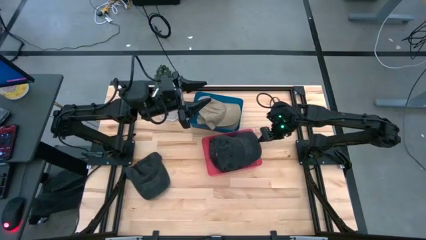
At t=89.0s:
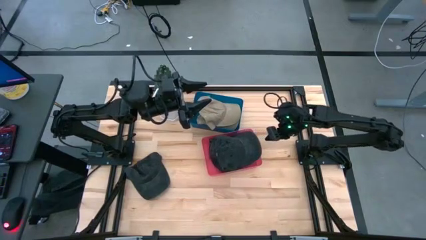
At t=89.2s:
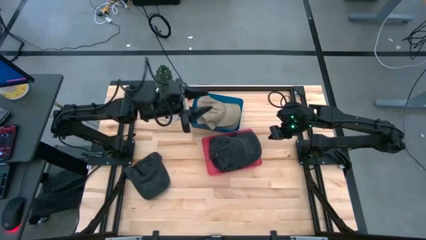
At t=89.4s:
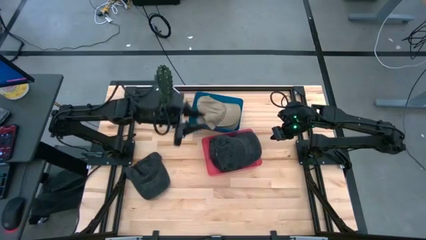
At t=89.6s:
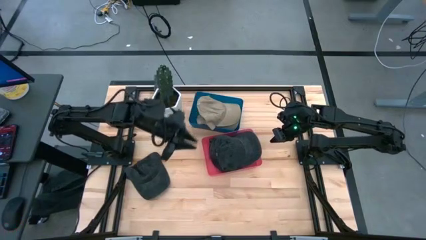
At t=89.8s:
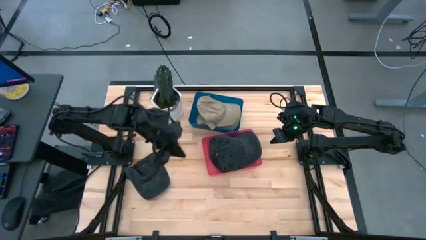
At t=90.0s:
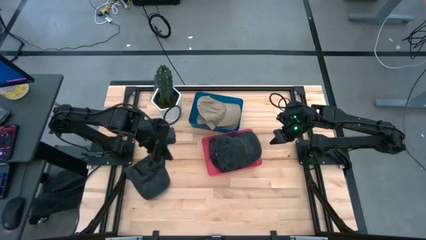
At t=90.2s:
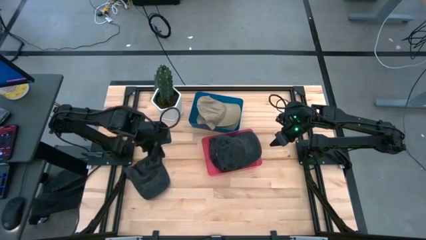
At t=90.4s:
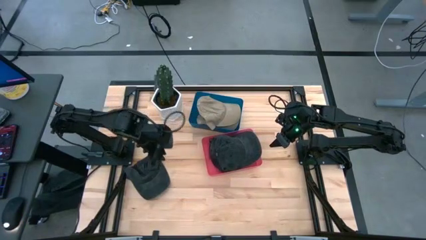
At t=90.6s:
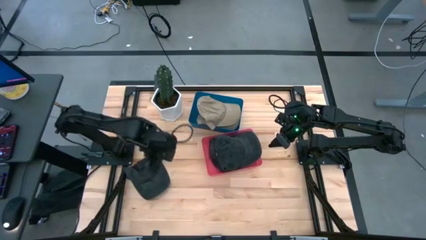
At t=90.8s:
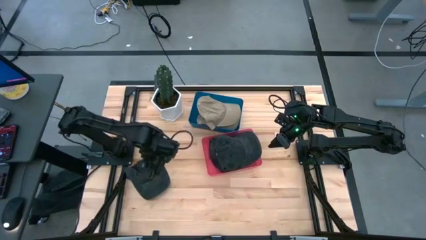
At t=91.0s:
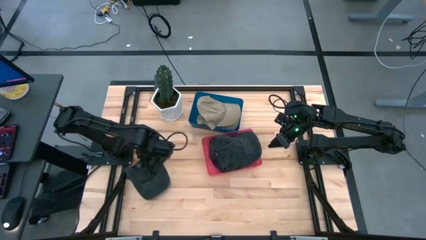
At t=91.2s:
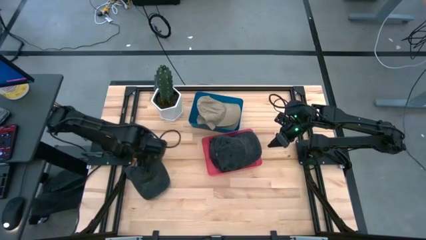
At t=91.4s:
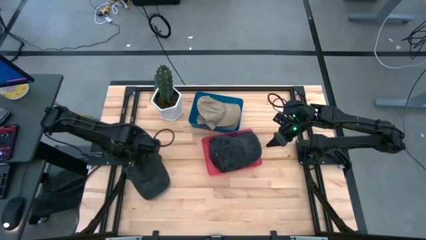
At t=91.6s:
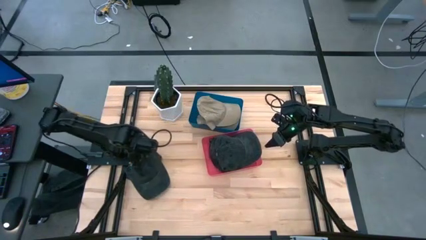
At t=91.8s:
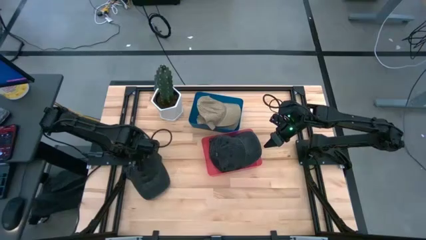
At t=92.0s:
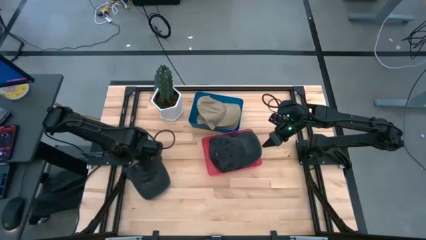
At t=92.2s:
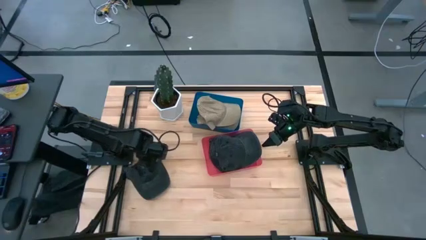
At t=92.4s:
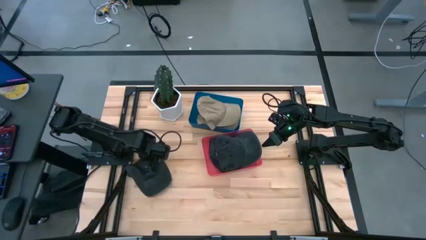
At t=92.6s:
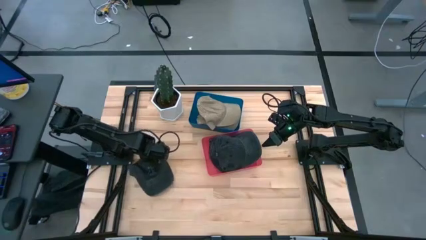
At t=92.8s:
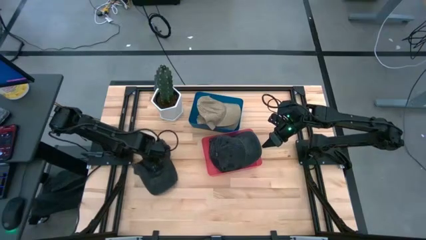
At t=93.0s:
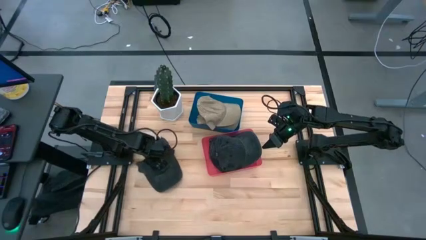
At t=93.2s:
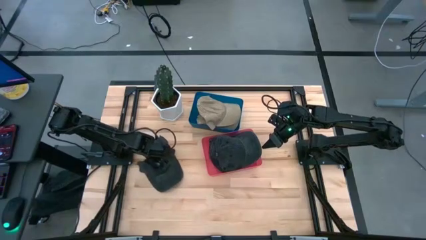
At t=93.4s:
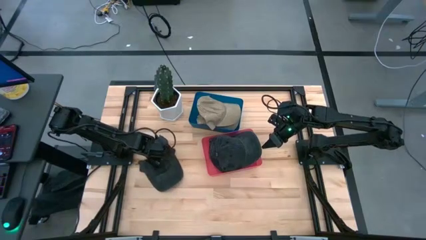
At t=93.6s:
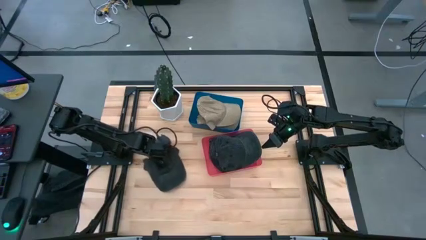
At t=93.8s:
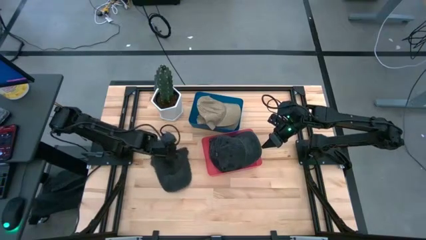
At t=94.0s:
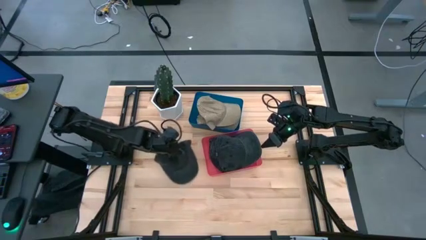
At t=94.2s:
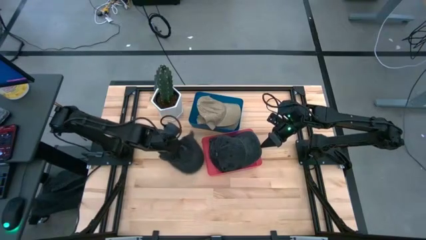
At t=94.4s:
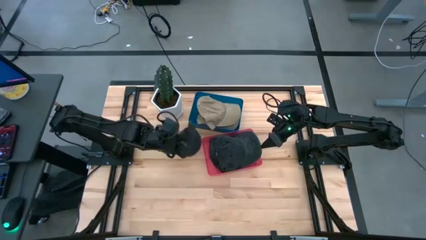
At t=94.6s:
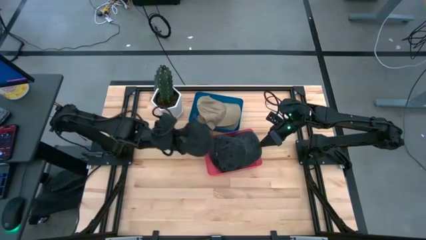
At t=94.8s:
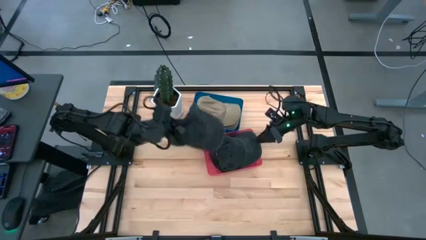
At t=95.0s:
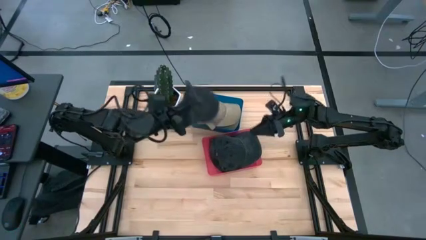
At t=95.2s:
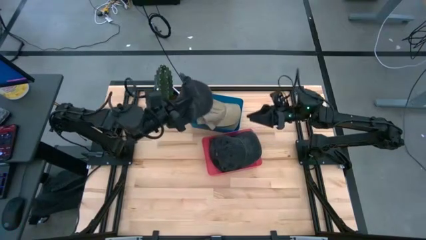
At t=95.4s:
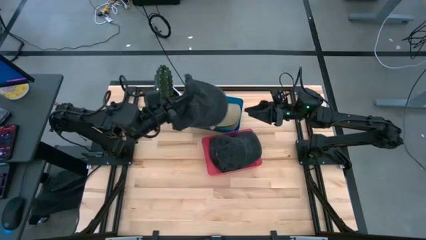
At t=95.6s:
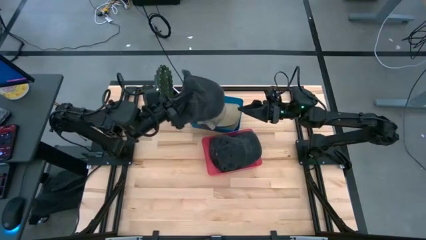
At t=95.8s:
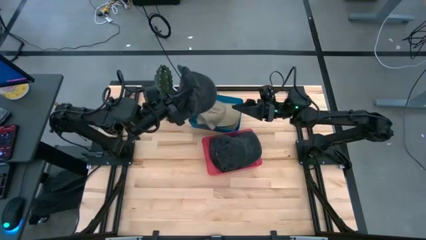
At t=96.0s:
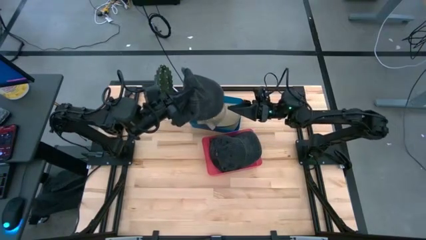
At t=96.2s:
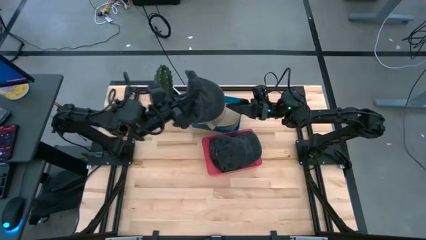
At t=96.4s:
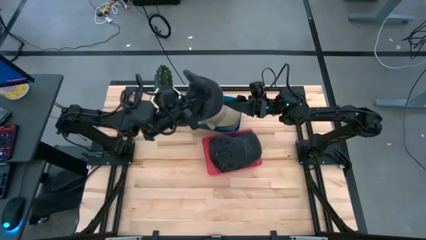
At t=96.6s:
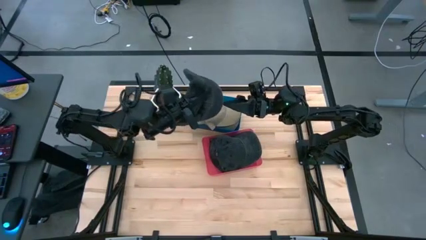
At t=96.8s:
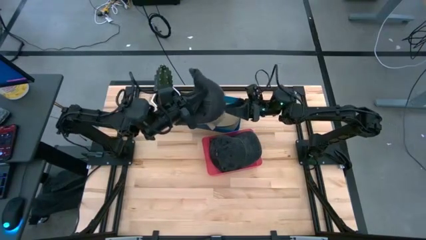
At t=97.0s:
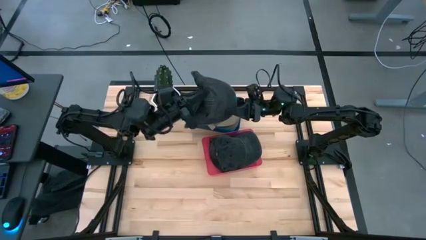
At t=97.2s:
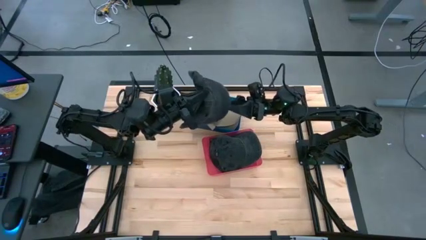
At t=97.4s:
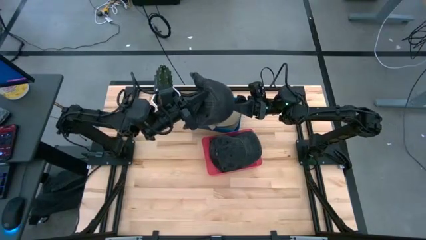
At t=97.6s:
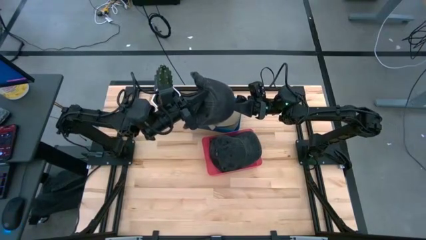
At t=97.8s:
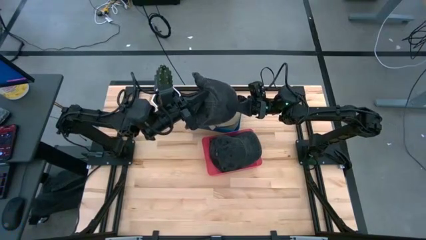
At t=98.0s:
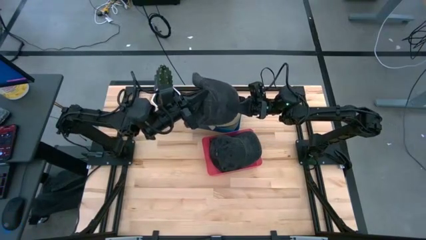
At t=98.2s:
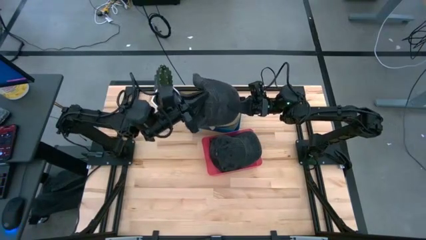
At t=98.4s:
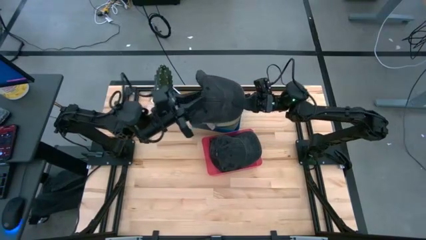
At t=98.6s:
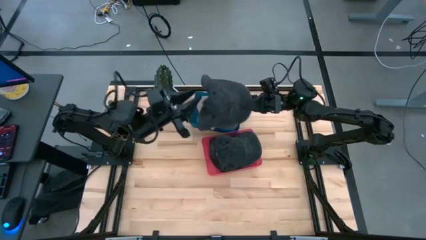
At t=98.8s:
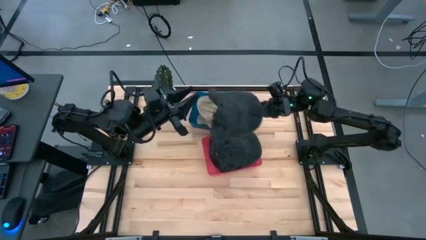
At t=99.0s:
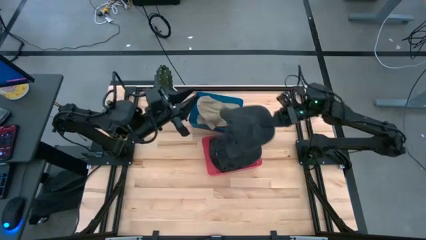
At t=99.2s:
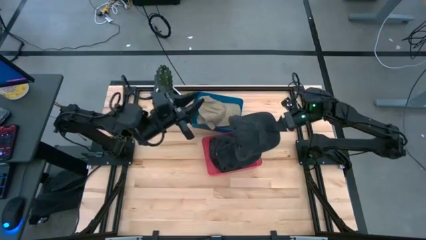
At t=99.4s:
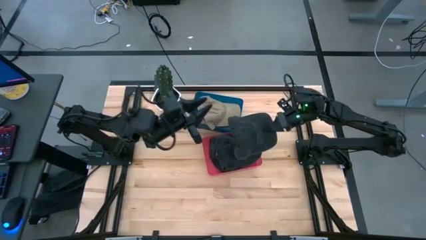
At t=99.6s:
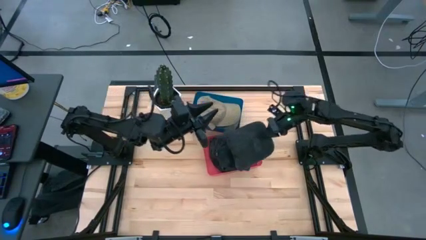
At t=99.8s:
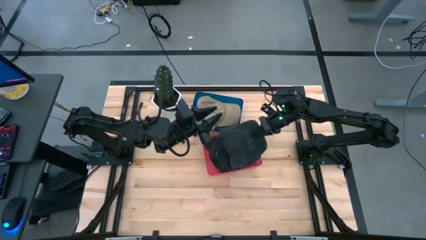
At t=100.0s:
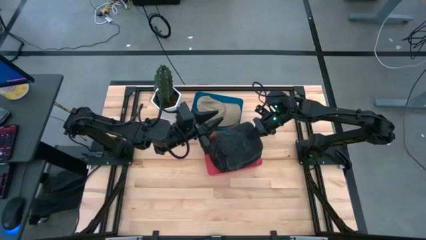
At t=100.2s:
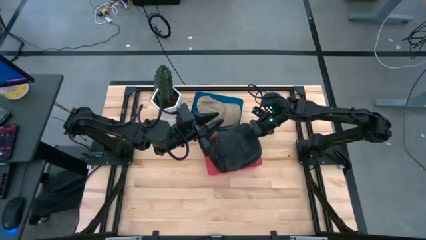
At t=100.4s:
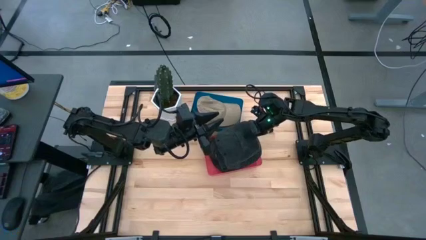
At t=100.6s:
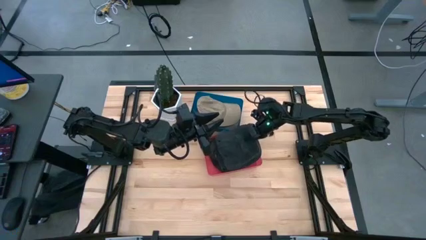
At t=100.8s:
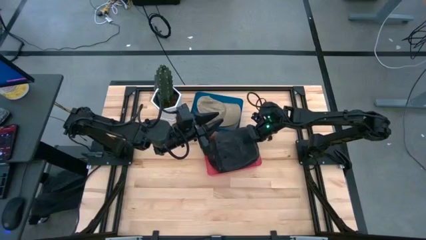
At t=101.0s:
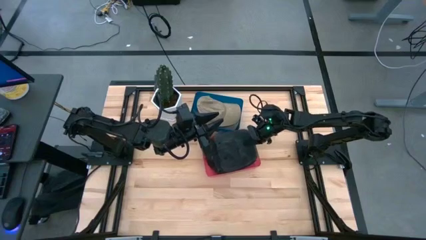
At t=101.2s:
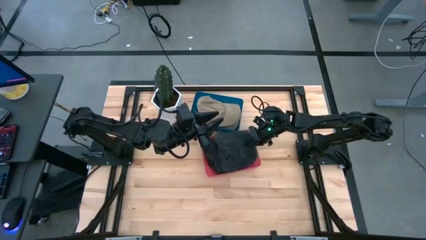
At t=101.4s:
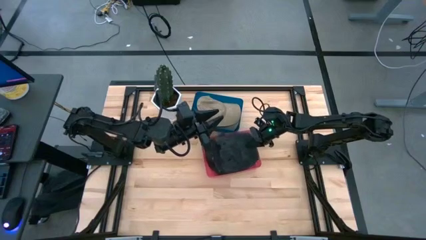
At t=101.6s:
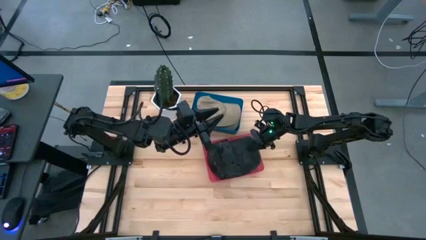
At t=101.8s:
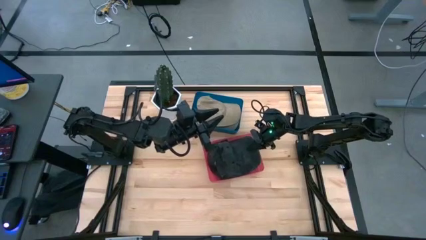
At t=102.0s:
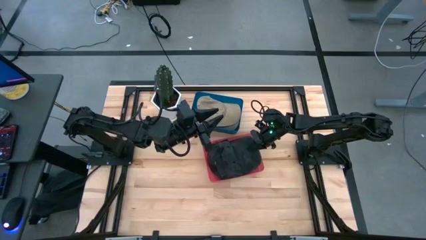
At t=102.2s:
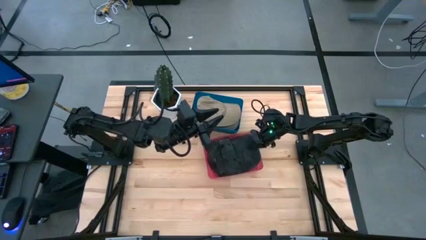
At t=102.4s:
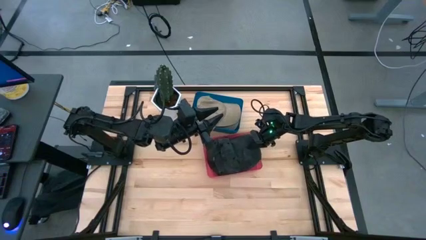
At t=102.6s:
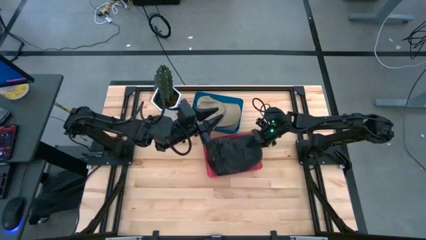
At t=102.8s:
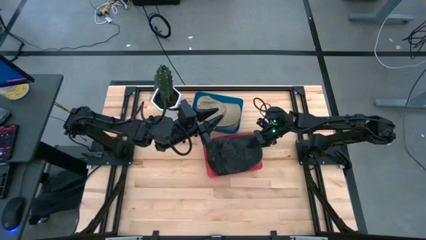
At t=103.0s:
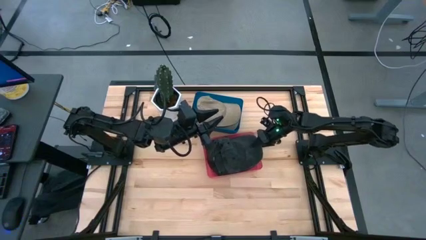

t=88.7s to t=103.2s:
Task: Pick & Place hat
Put the black cap into the red bin

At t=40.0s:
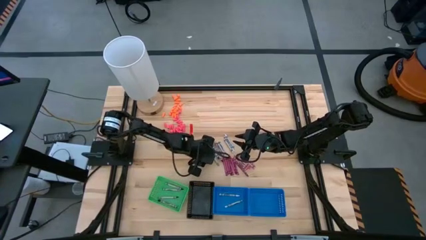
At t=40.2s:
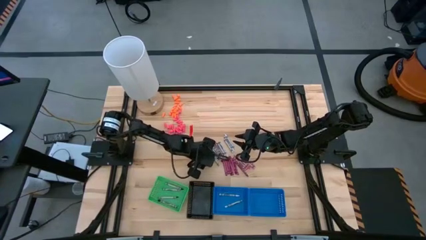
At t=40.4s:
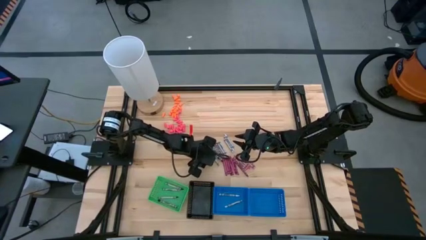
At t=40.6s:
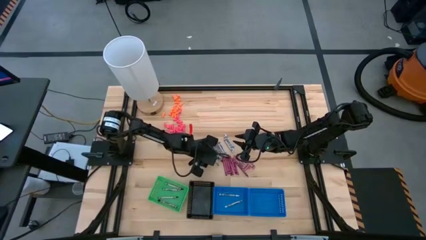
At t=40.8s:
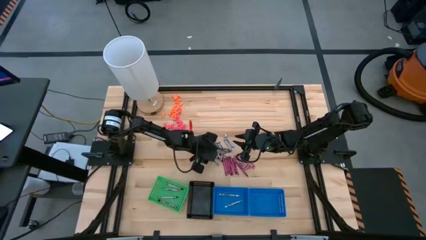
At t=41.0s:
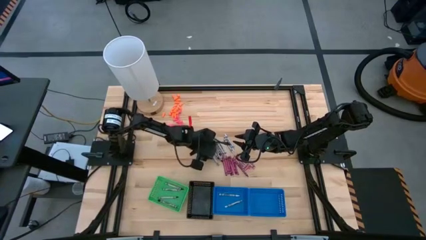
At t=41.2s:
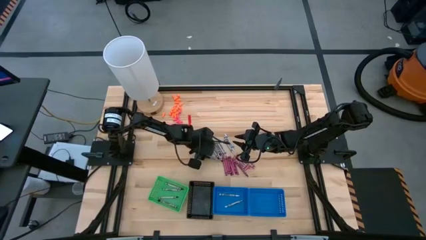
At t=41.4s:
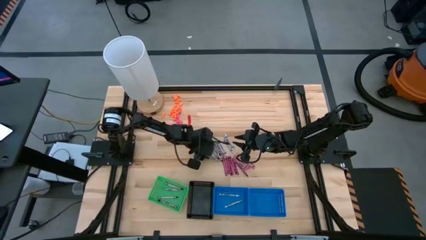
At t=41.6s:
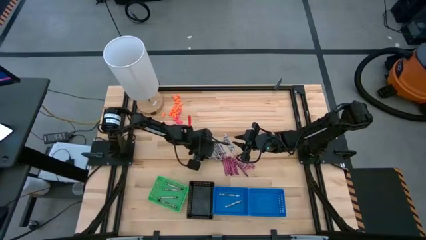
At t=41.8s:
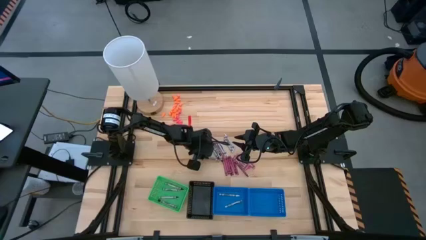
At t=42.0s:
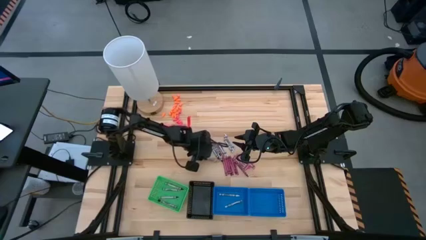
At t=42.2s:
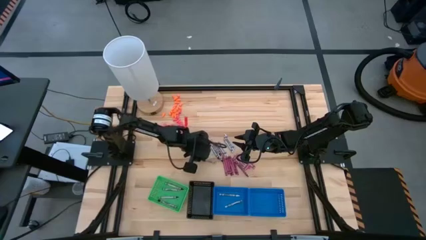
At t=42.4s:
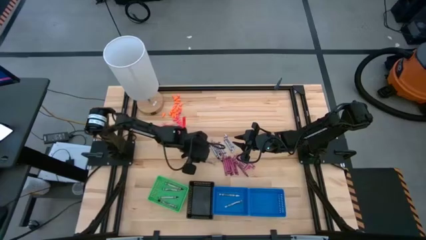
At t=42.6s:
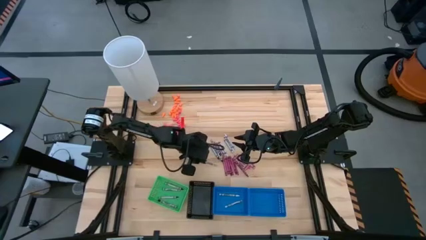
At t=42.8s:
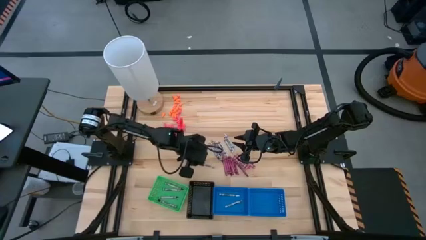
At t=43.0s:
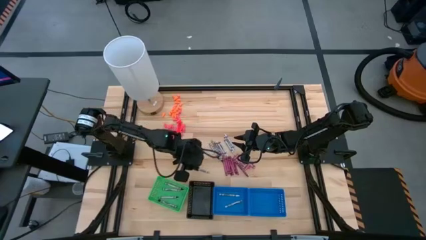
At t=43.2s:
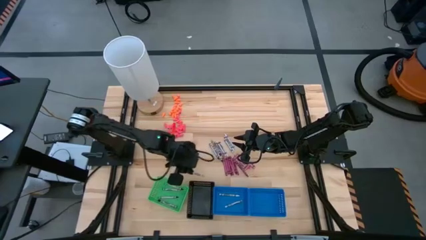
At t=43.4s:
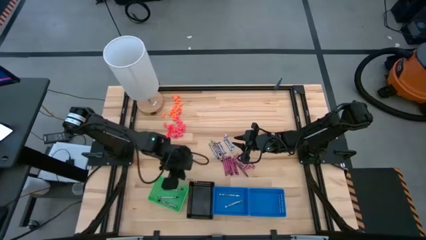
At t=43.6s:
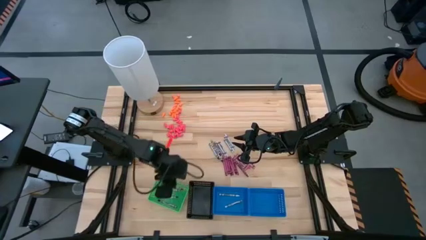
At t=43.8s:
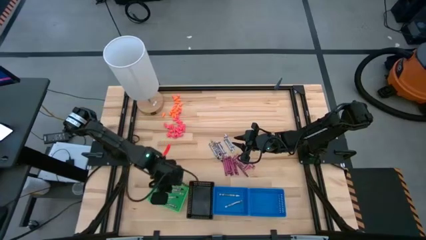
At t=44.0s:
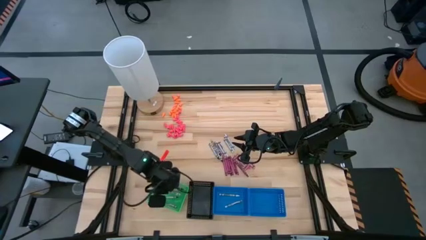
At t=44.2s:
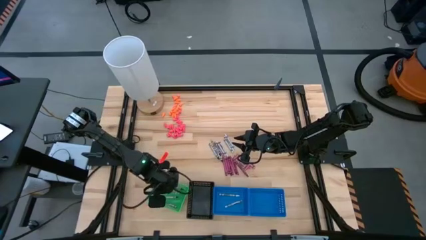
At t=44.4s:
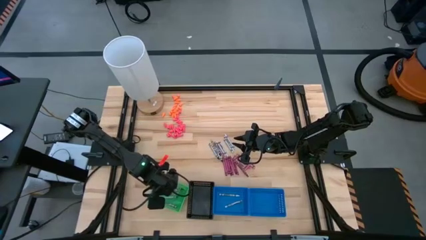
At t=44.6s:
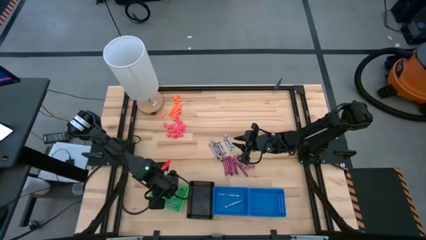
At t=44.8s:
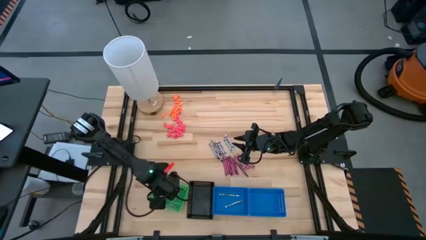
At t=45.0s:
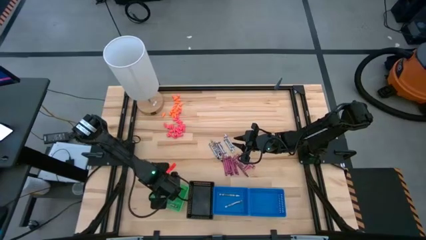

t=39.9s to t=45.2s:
Task: Sort crayons
Put the black crayon into the green bin
